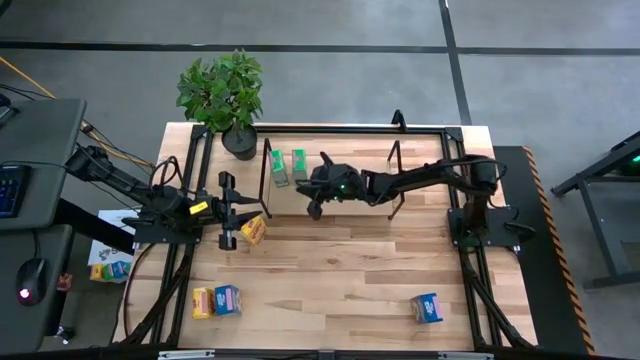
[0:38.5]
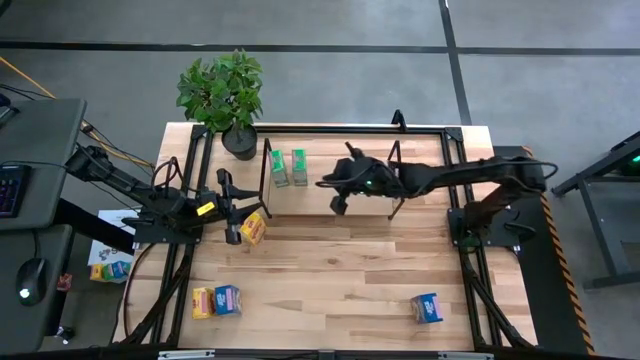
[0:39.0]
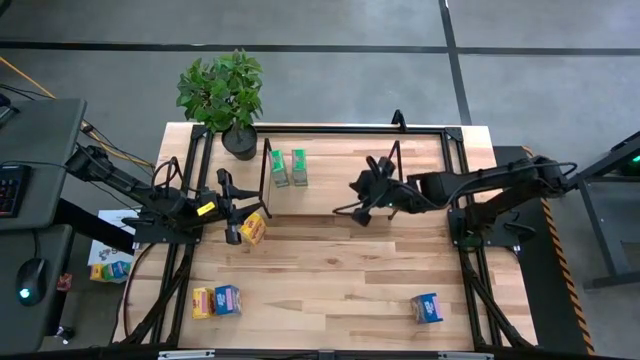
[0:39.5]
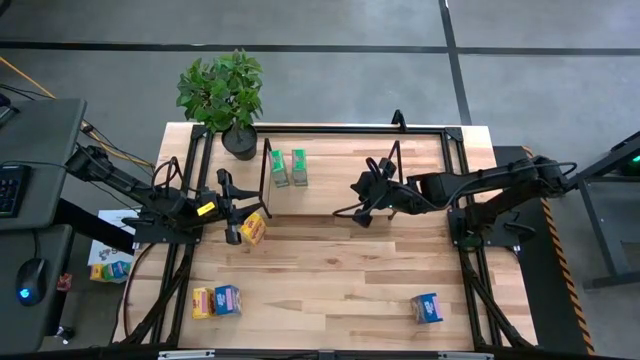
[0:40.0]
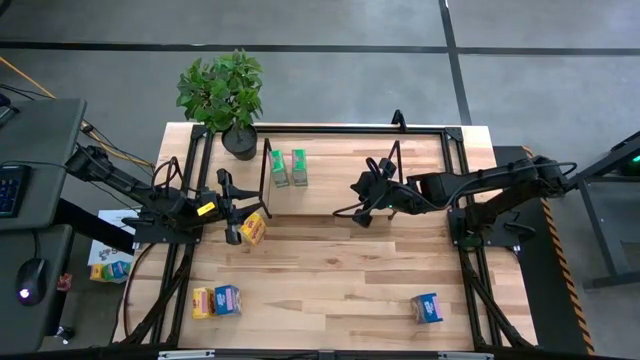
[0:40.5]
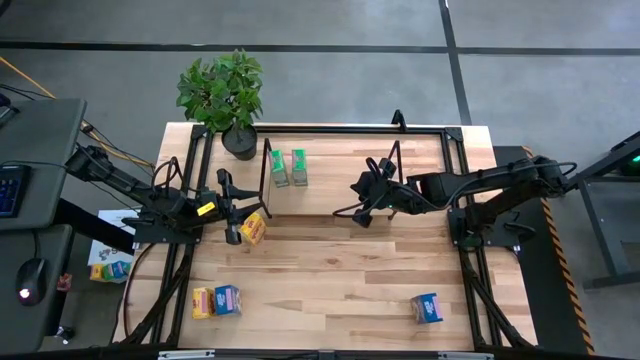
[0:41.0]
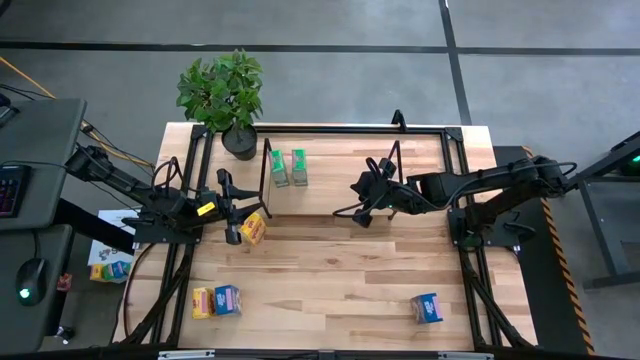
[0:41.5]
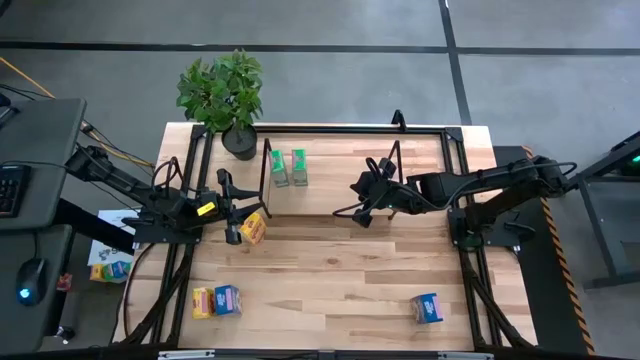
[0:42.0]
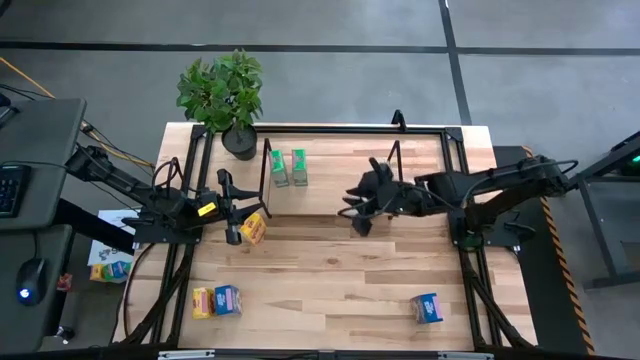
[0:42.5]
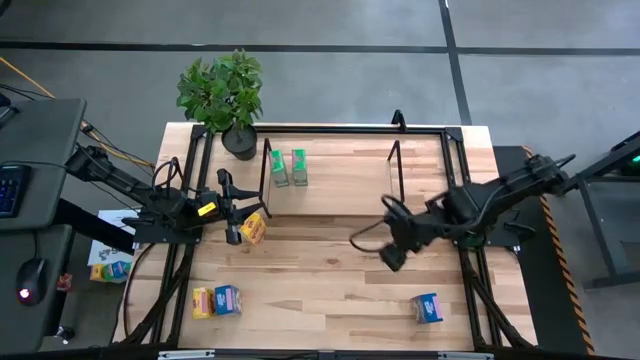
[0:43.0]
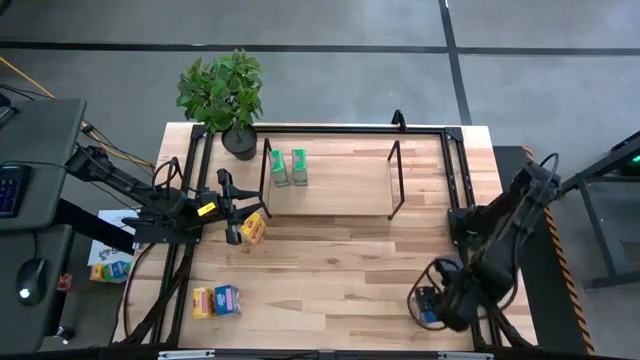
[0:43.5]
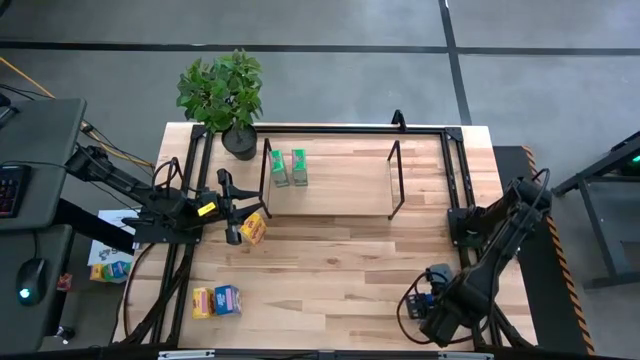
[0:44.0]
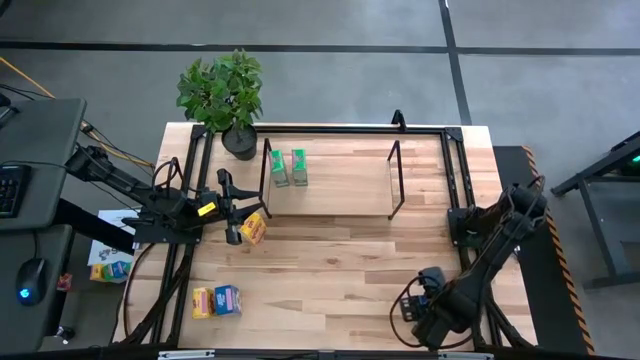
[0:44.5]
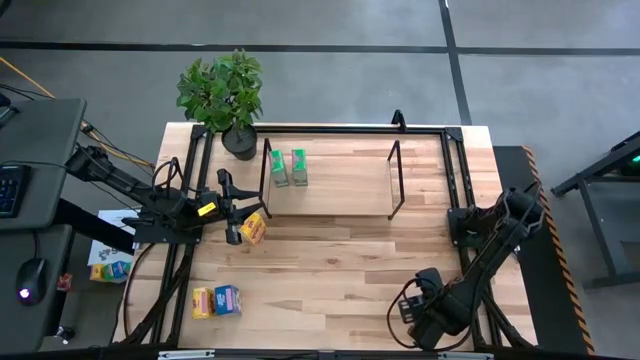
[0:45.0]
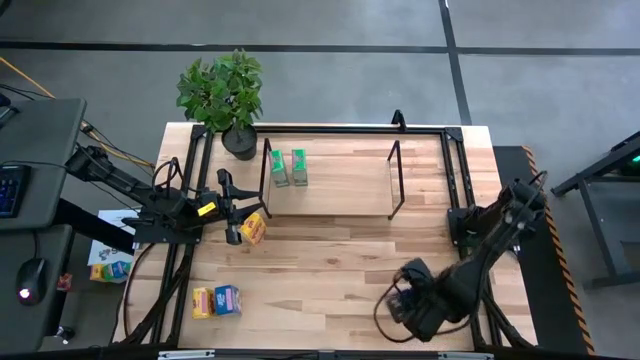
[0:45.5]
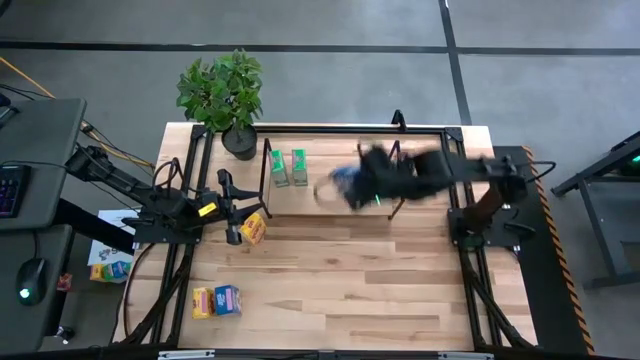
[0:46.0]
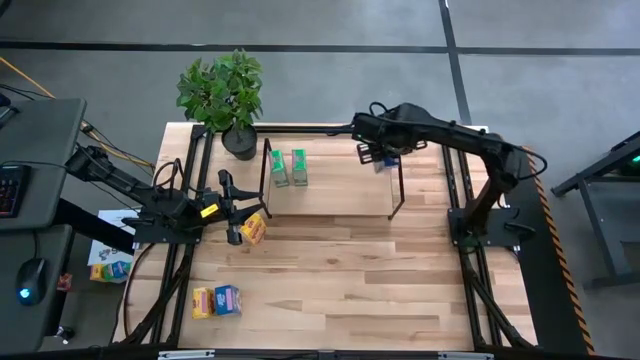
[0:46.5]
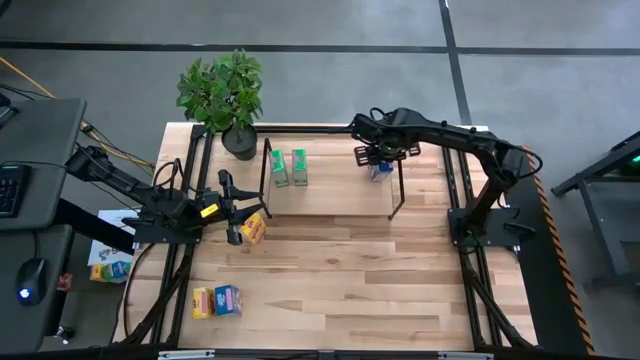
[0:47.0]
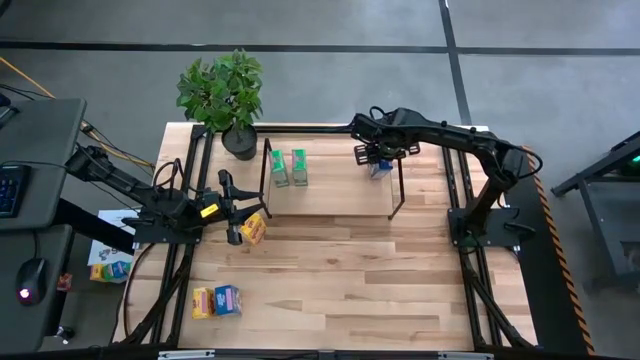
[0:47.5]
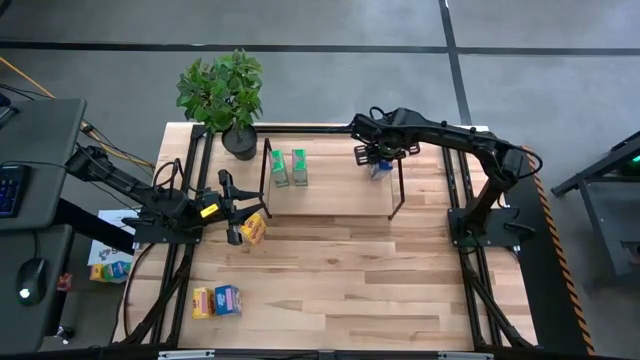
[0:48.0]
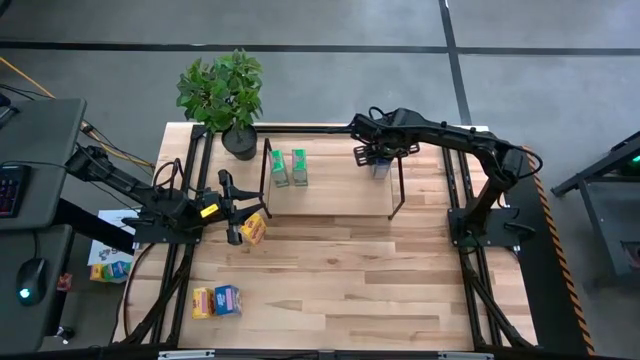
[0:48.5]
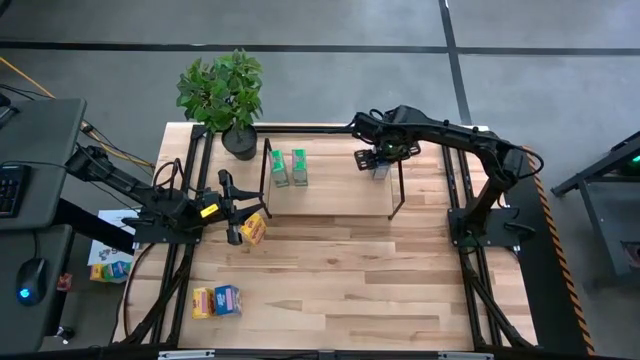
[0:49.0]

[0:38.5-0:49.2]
Task: Stack cereal on shelf
Put the right blue cereal box on the shelf

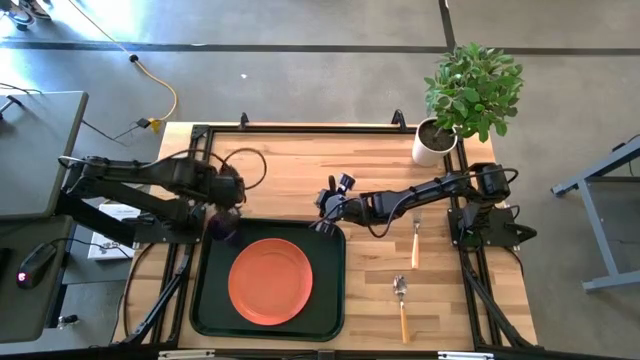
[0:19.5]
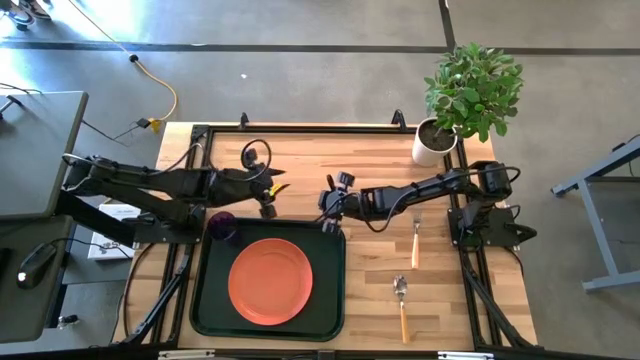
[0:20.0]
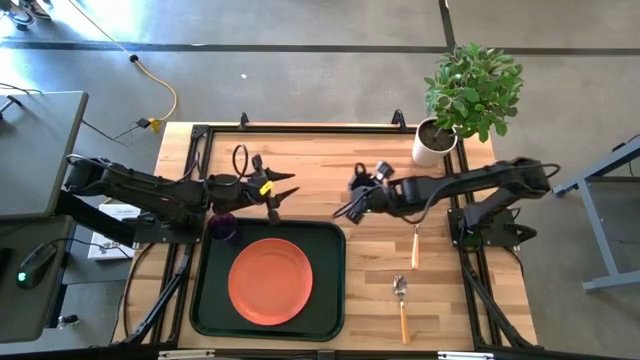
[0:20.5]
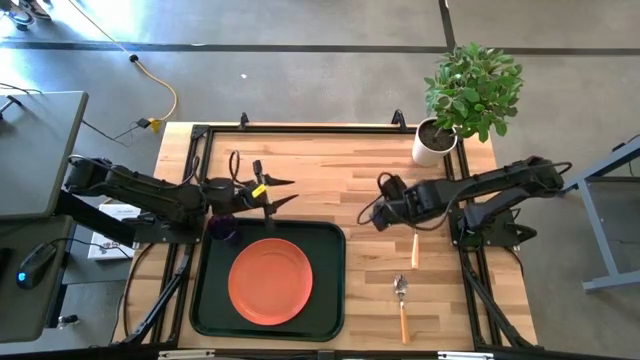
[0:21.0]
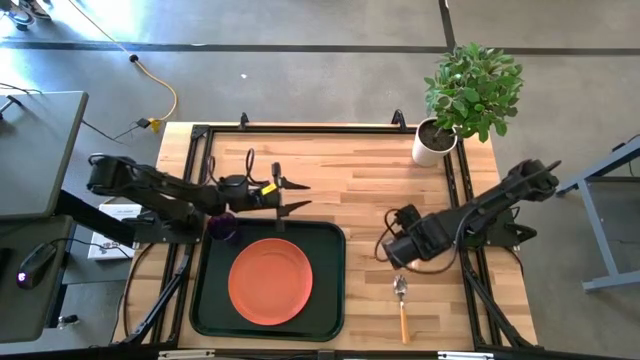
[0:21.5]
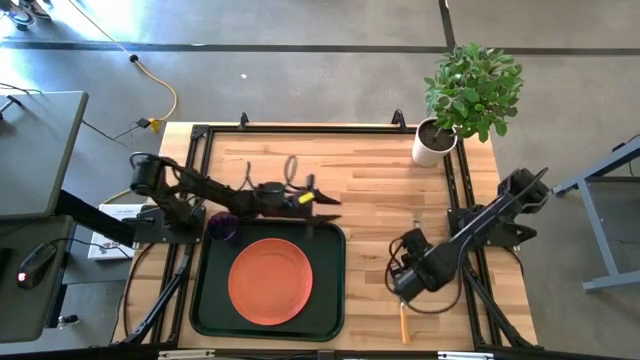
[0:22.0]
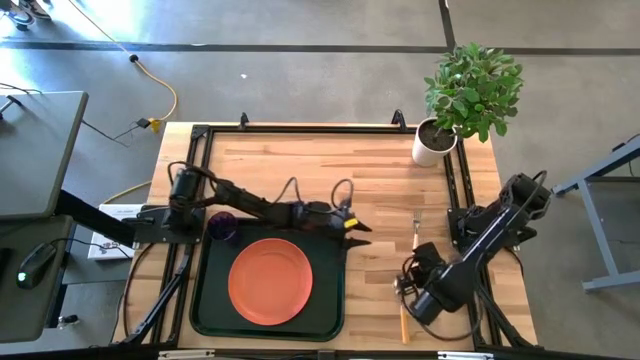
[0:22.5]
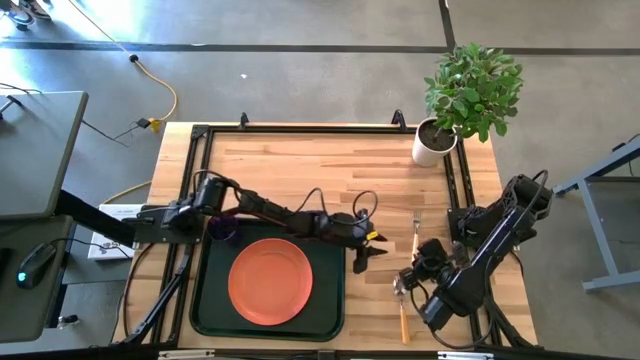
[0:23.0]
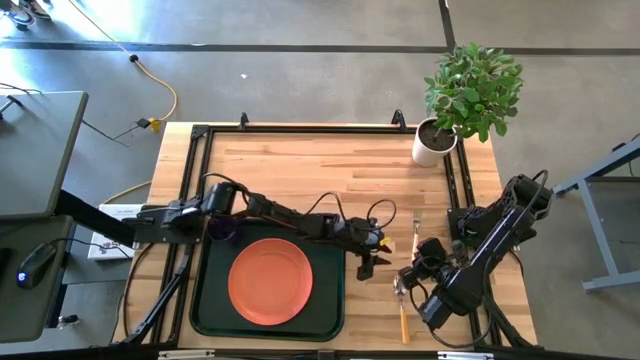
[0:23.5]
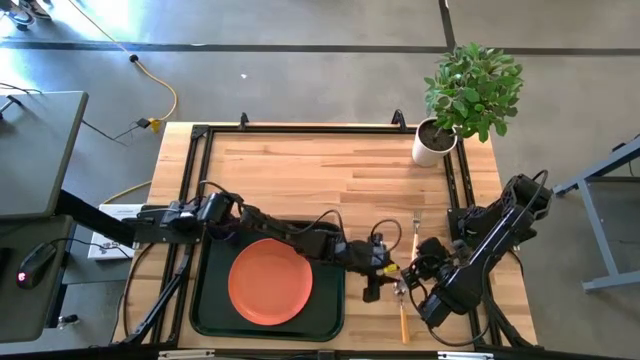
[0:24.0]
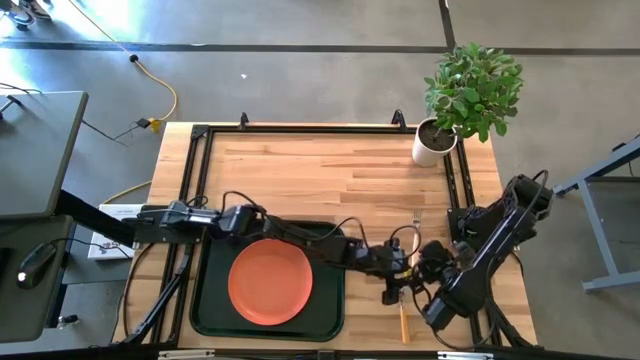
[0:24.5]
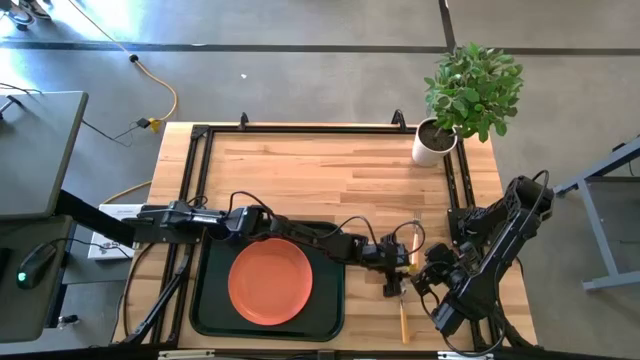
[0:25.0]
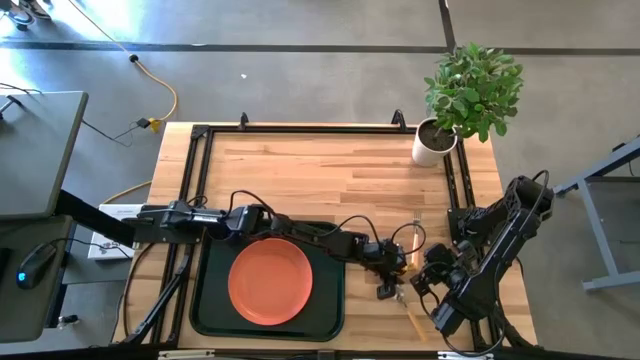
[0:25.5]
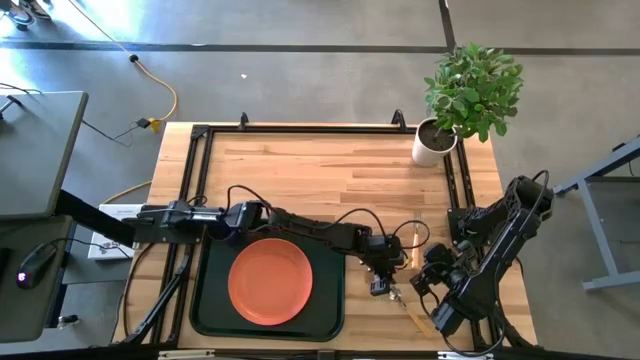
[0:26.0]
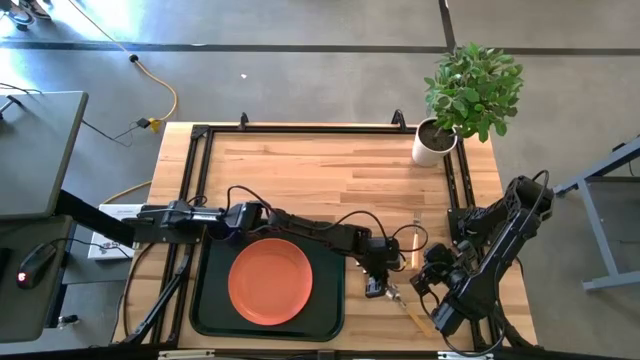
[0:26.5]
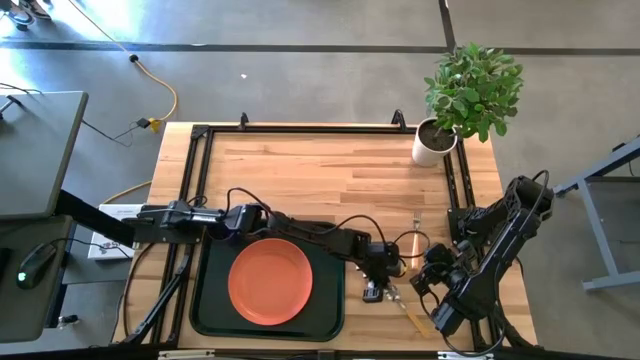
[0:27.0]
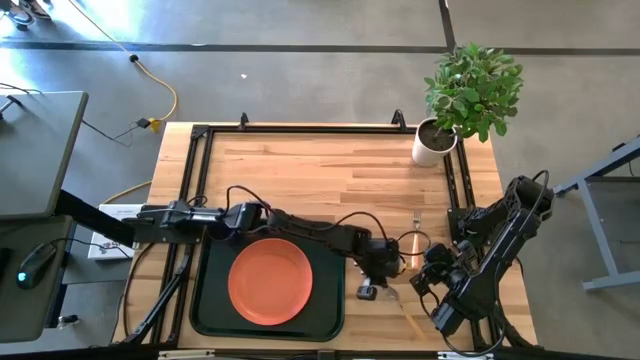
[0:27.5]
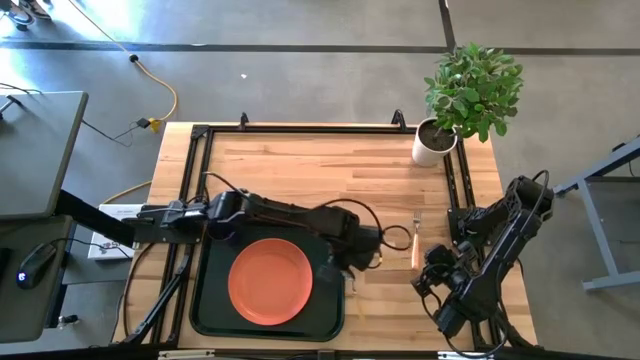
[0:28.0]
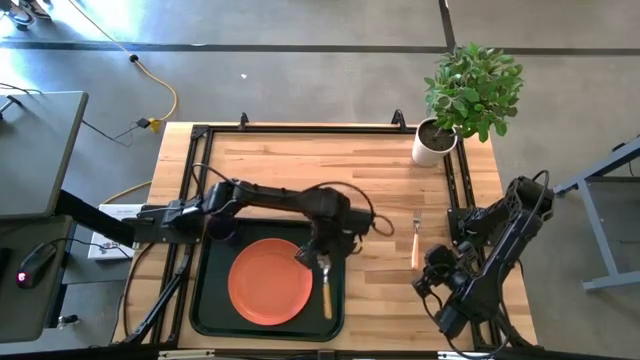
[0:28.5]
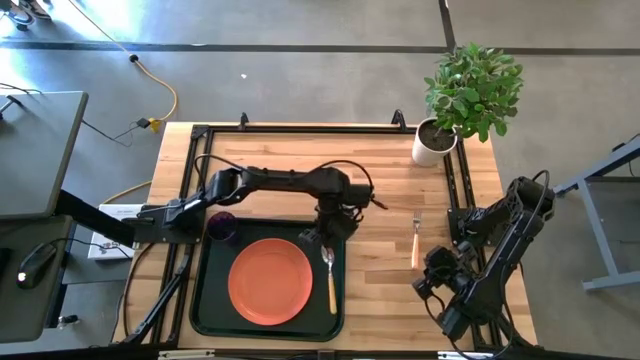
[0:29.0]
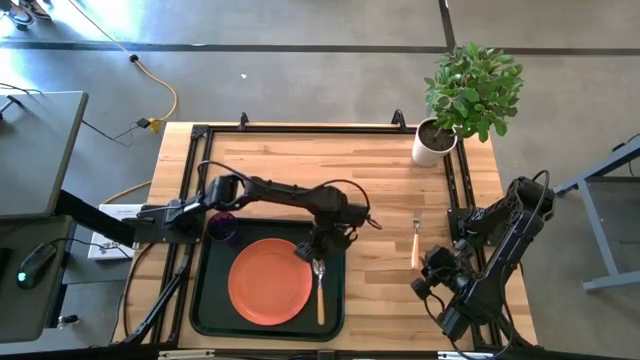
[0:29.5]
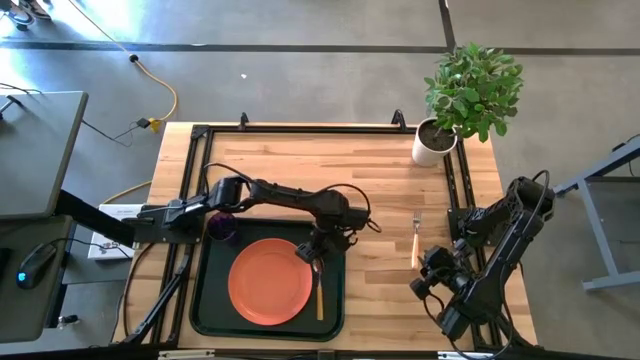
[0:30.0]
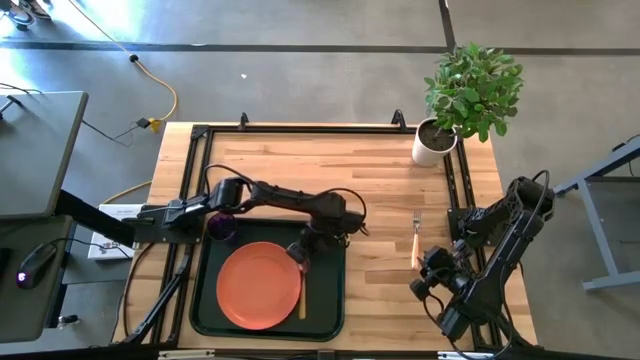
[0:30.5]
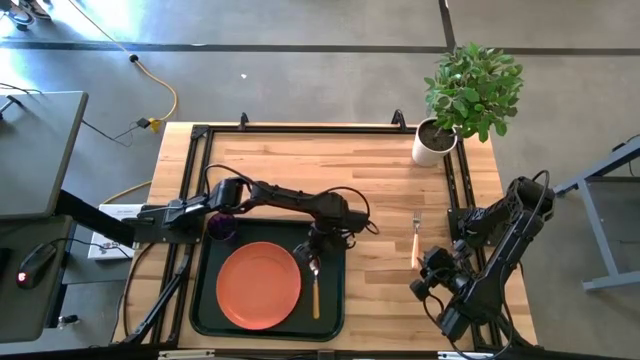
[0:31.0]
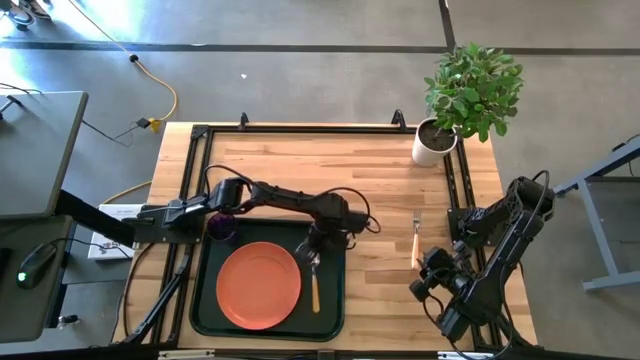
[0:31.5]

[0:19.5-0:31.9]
Task: Pick and place plate/cup/fork/spoon on tray
Put the yellow spoon on the black serving tray to the right of the orange plate
